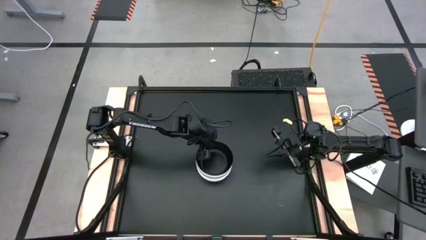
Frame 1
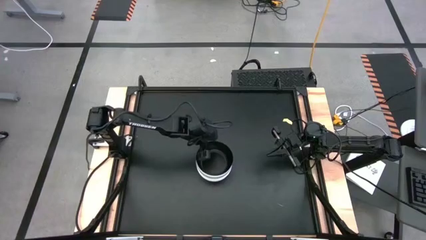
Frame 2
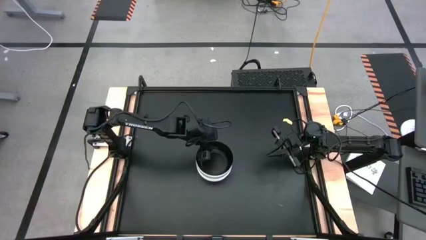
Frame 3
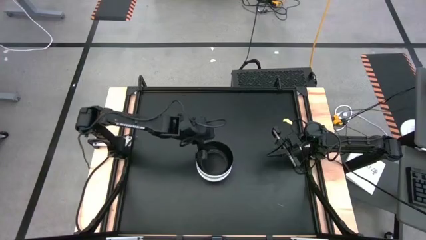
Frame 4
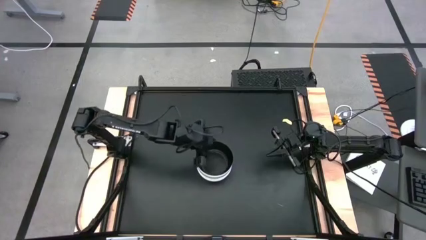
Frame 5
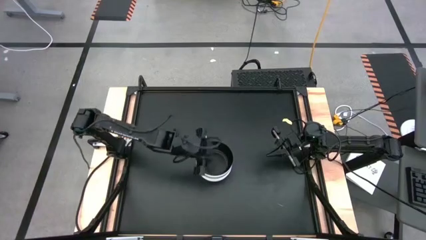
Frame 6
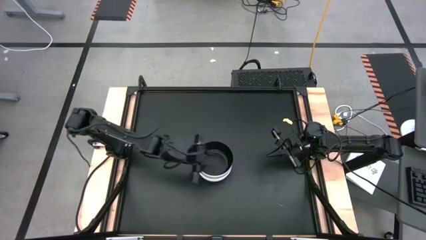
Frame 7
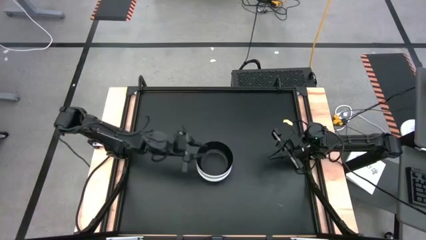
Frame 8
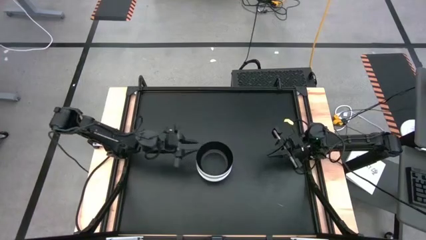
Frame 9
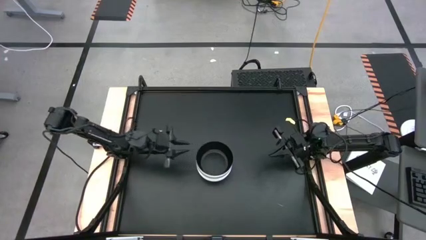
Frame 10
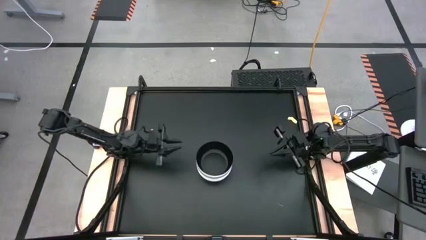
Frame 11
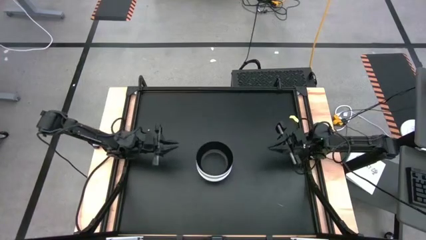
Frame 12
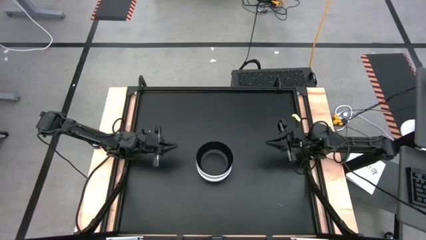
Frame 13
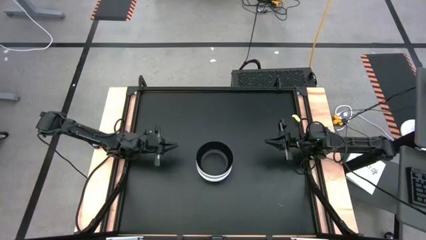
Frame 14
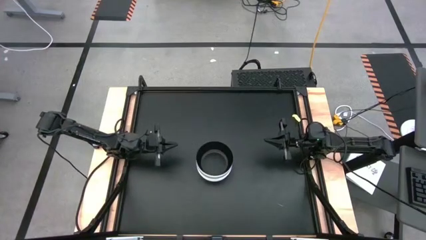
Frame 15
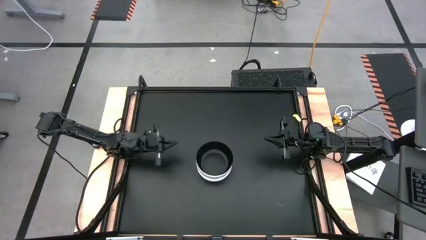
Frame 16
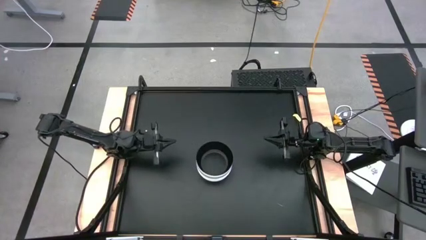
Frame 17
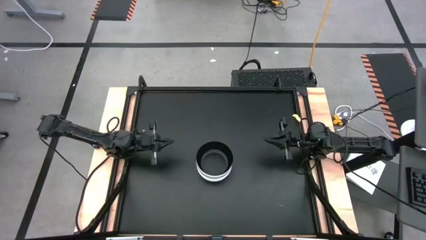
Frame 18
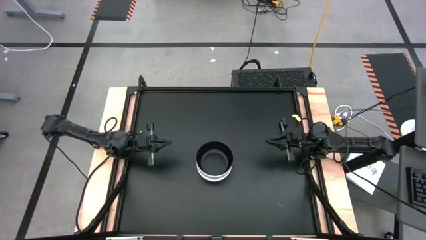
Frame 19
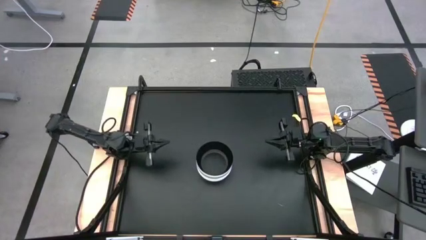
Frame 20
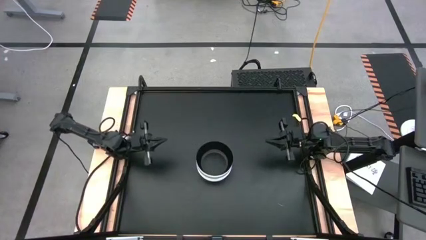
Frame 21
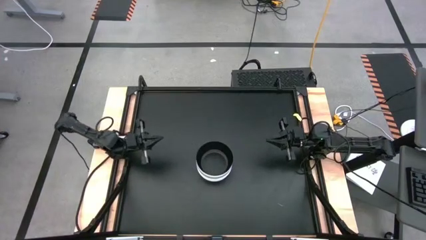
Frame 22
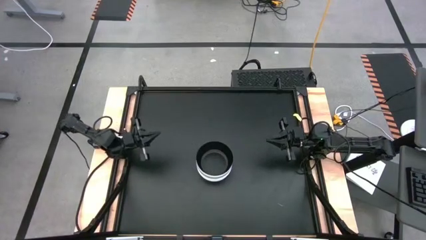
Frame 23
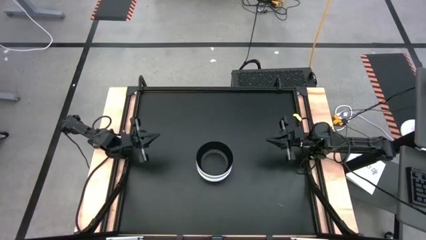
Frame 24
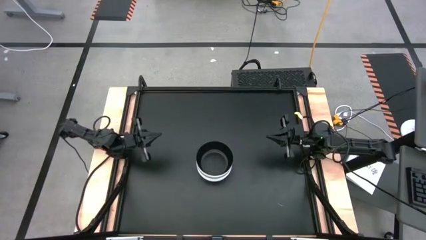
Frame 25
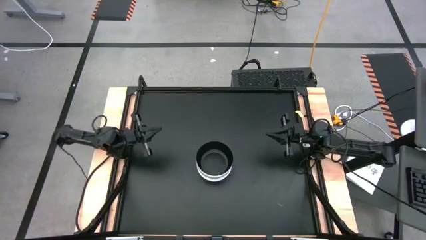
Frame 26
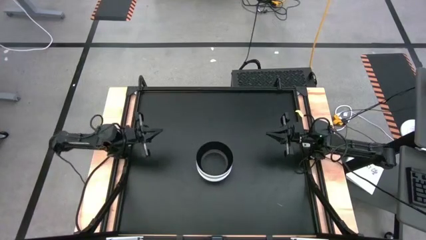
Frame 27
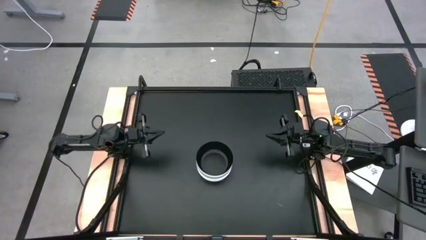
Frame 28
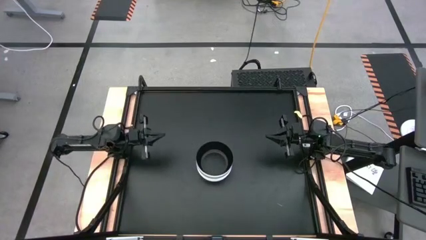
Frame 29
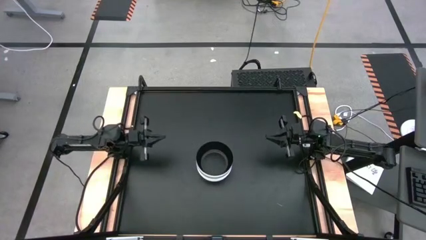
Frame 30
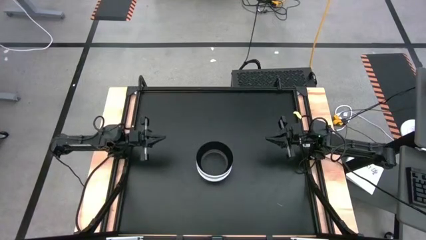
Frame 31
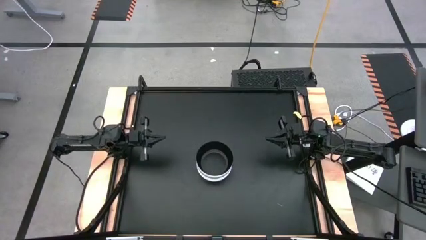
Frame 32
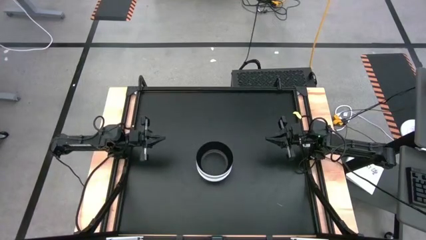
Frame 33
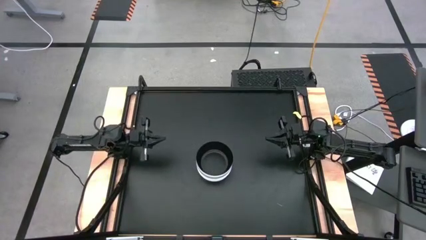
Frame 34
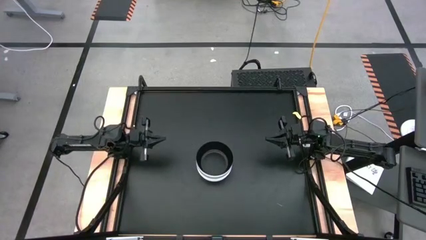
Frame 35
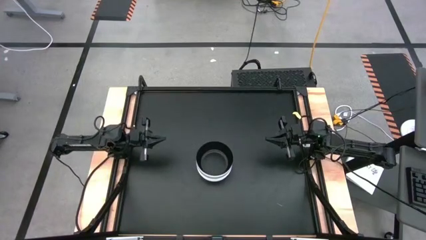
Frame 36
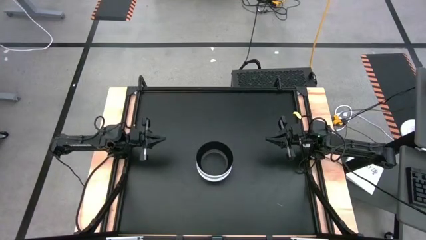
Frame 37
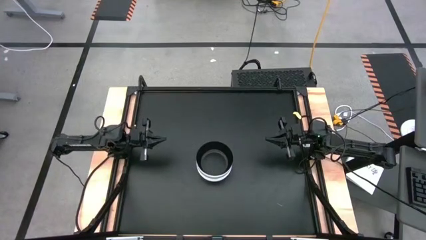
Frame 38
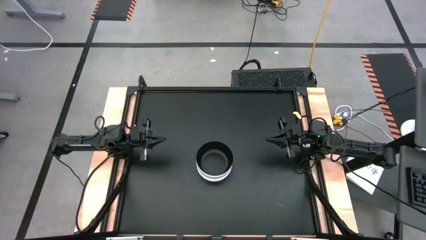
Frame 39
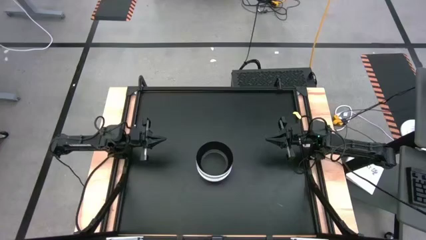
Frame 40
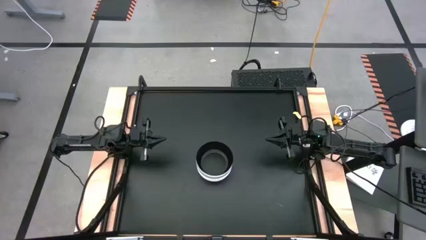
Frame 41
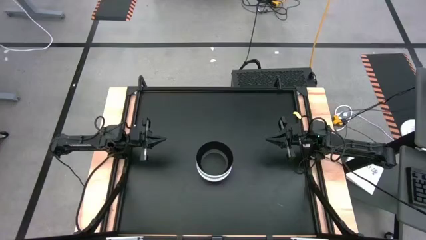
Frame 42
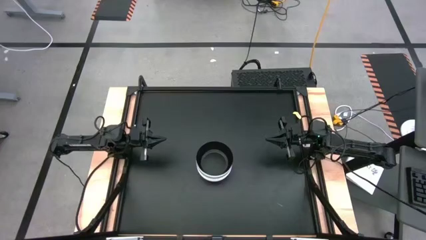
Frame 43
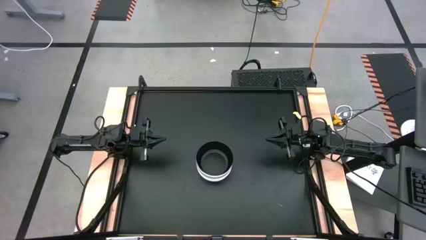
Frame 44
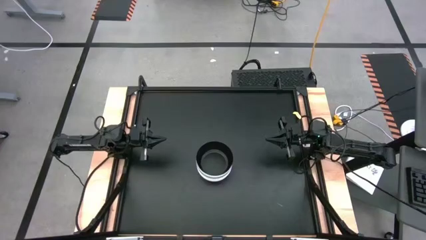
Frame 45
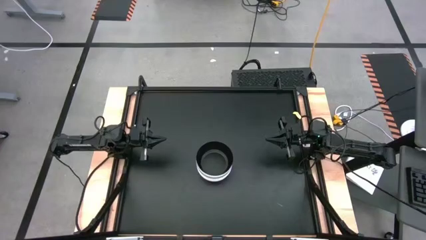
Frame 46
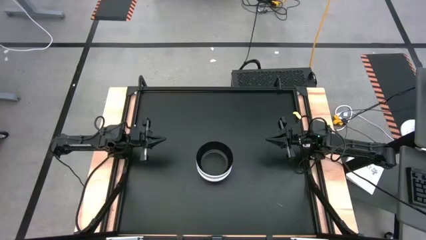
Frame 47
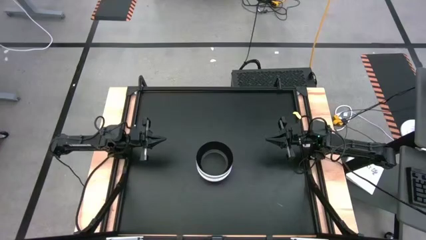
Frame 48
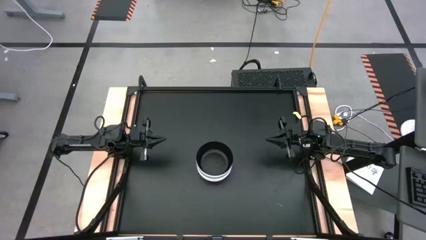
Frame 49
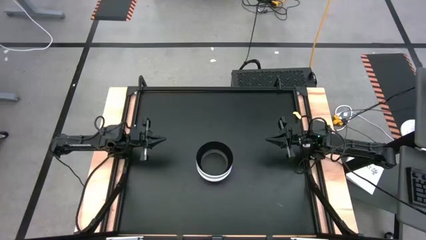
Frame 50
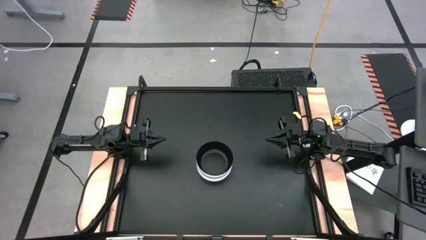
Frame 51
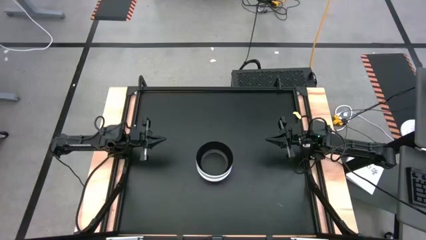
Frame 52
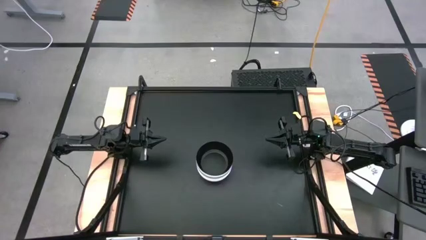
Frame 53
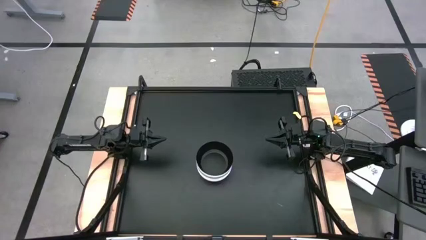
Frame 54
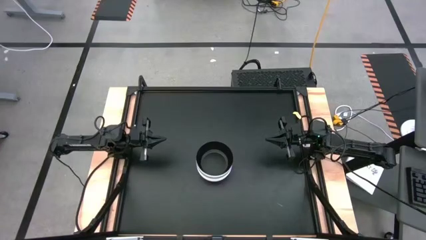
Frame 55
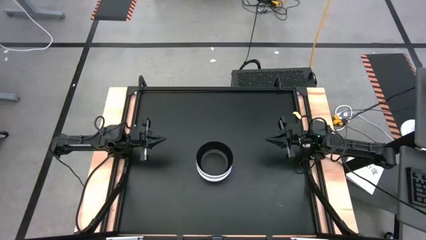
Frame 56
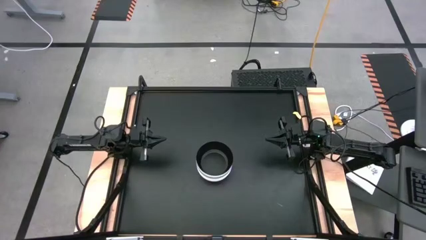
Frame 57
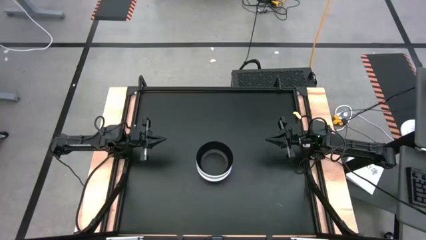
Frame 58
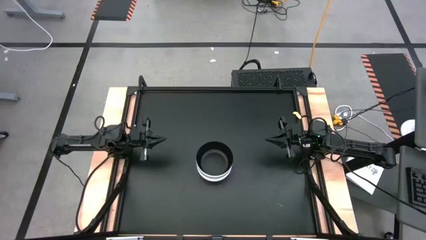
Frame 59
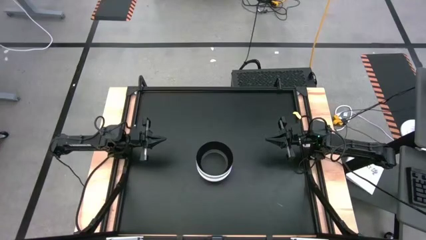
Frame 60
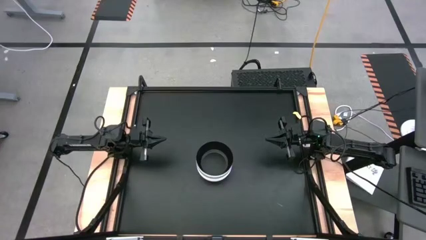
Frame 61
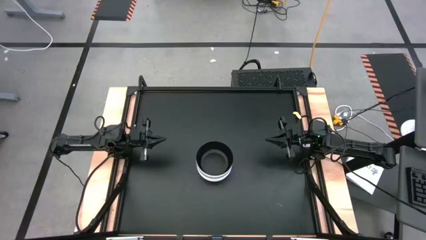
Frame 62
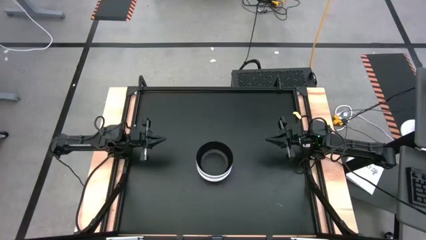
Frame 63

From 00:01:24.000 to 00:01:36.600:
Task: Nest bowls inside each other
Return to Home Position

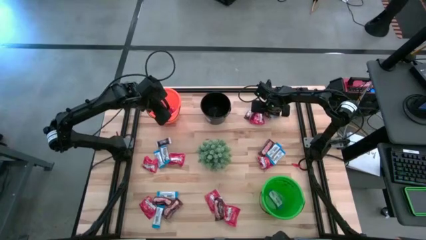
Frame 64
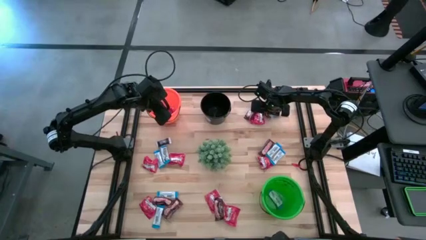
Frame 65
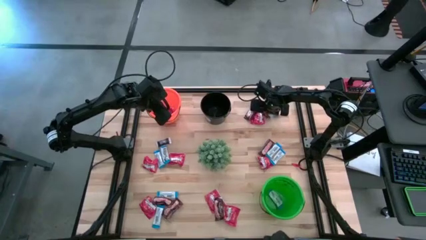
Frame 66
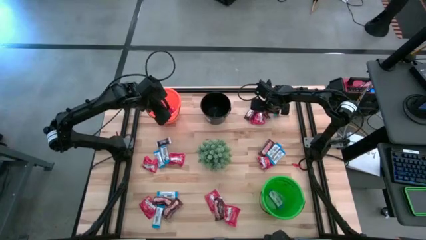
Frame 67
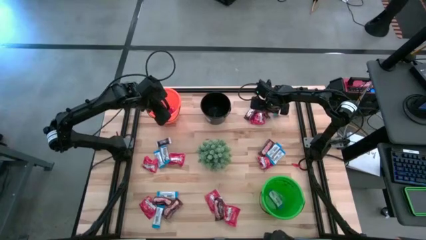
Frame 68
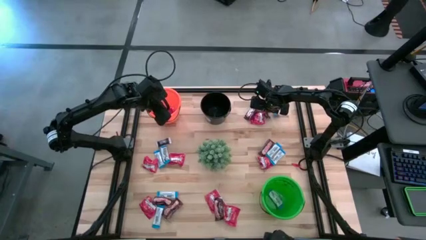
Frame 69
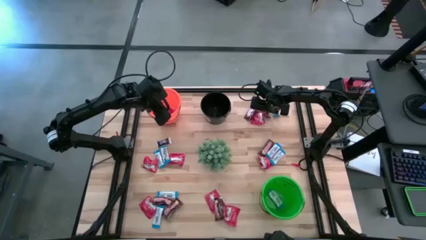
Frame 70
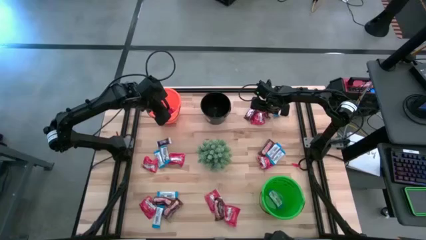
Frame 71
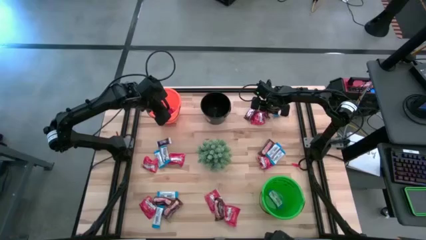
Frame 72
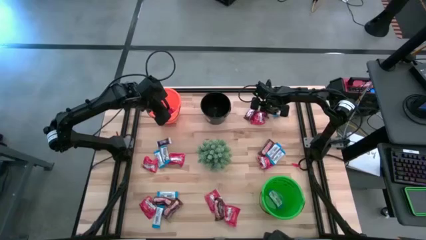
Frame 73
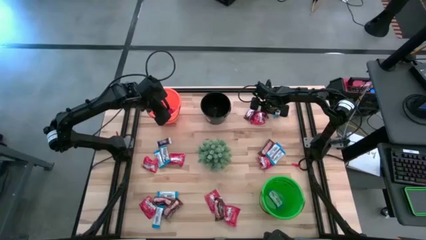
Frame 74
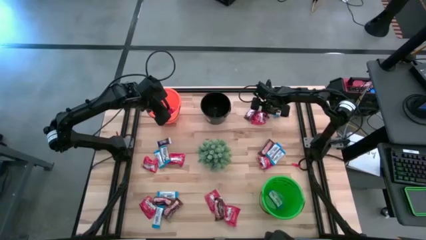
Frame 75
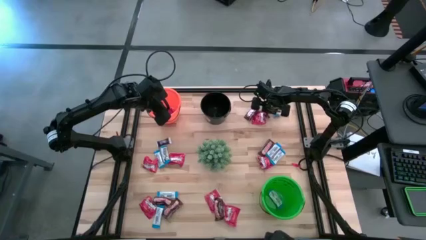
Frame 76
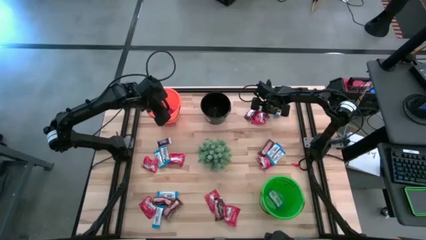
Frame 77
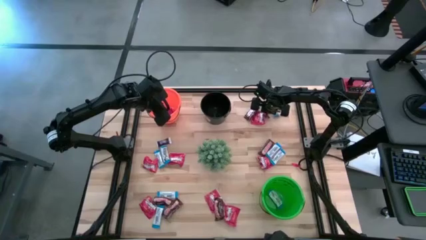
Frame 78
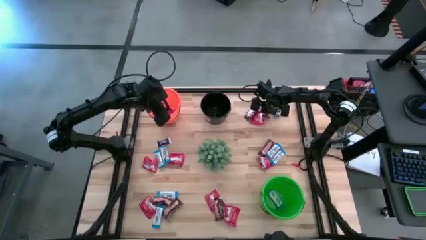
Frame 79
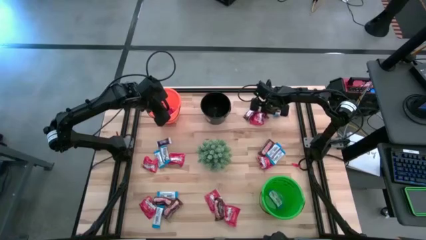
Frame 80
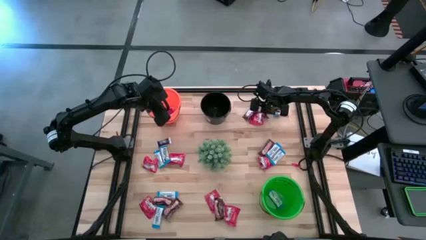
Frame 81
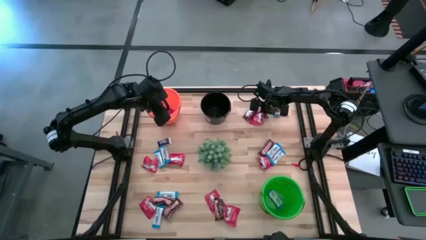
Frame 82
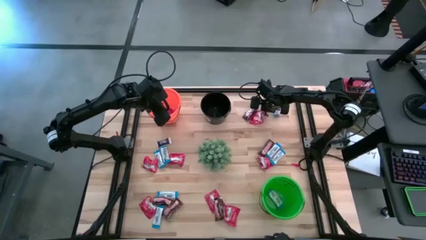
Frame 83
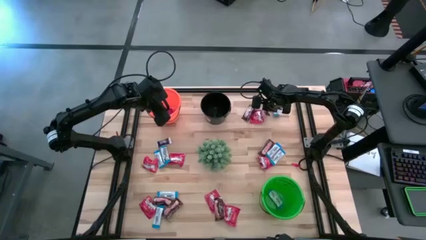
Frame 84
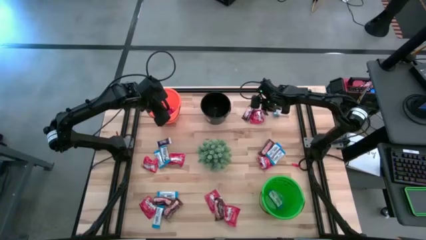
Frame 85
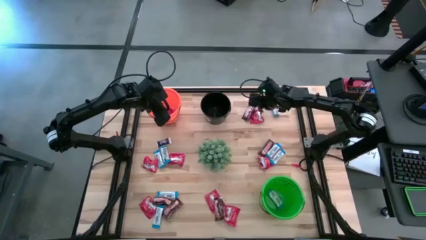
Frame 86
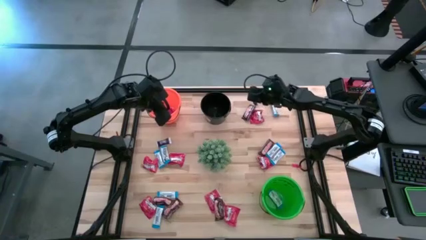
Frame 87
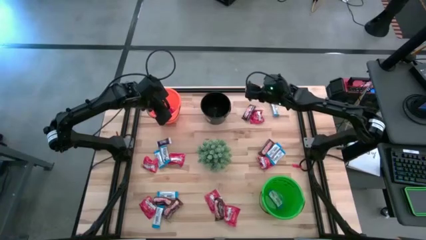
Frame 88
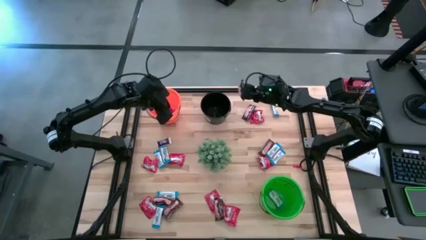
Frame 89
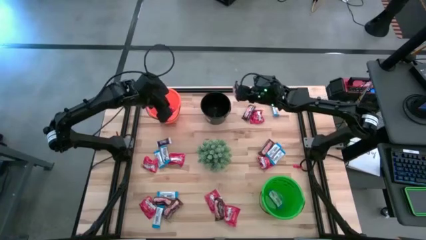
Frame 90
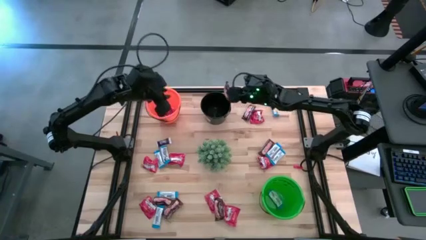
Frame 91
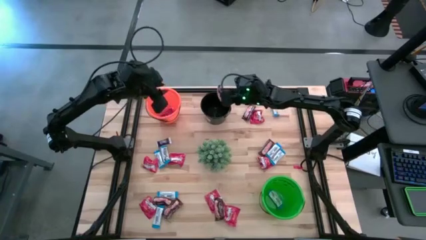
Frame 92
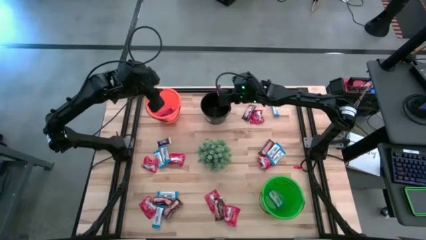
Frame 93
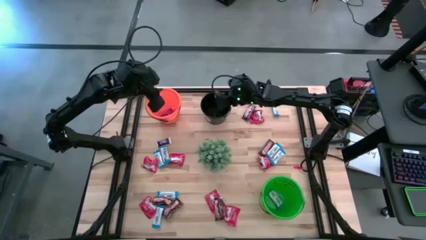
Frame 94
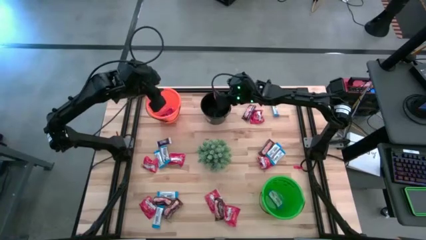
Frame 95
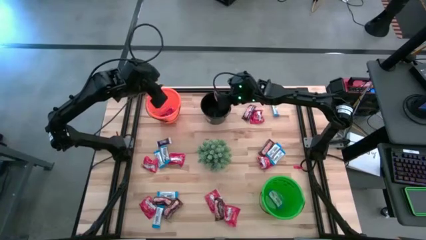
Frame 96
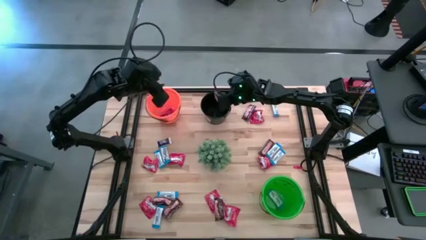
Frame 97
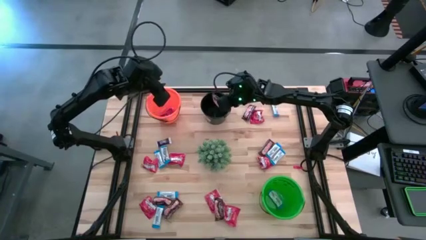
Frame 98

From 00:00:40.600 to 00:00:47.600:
Task: Sort candy
Put the brown chocolate into the black bucket
